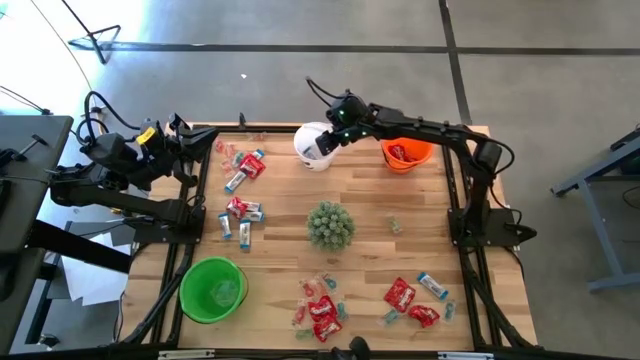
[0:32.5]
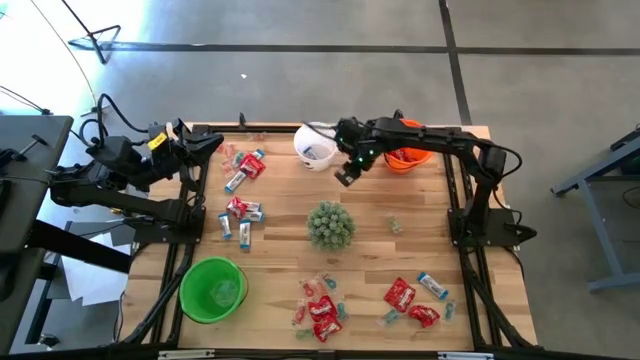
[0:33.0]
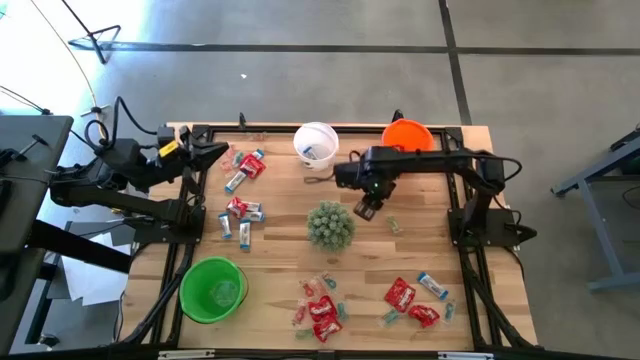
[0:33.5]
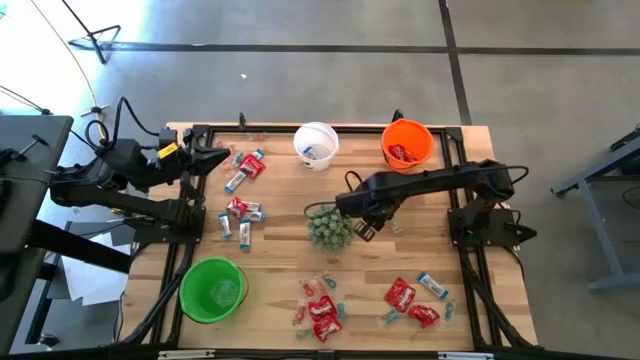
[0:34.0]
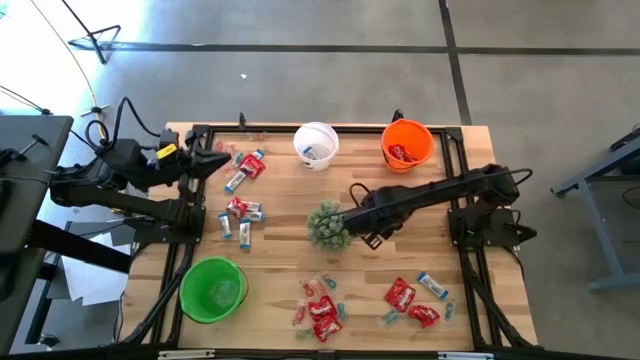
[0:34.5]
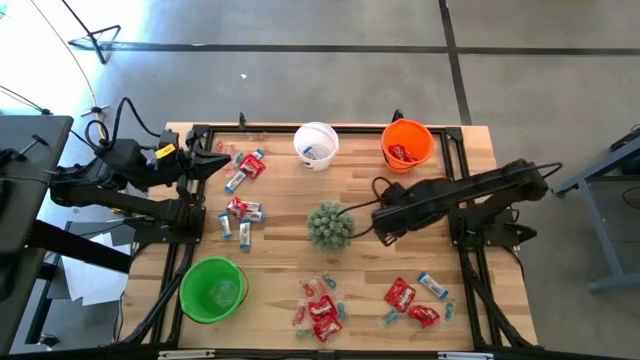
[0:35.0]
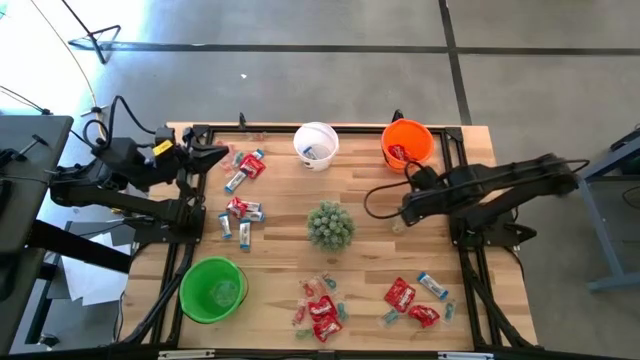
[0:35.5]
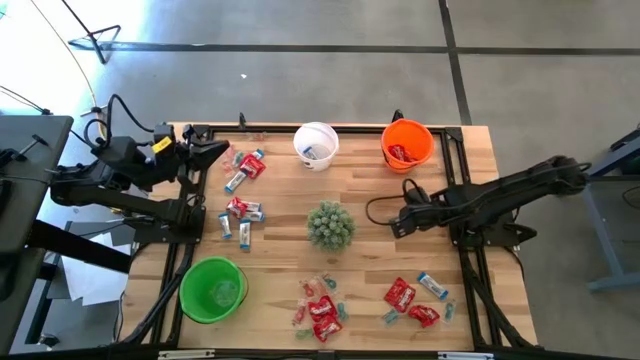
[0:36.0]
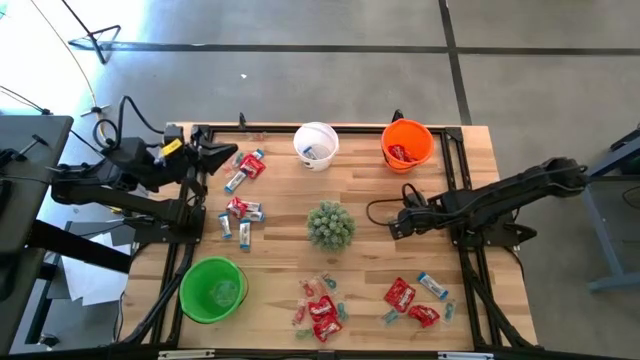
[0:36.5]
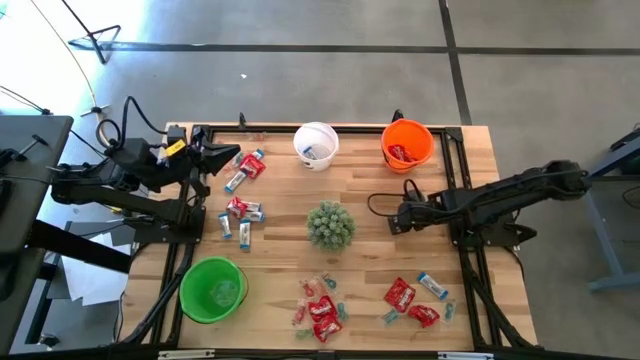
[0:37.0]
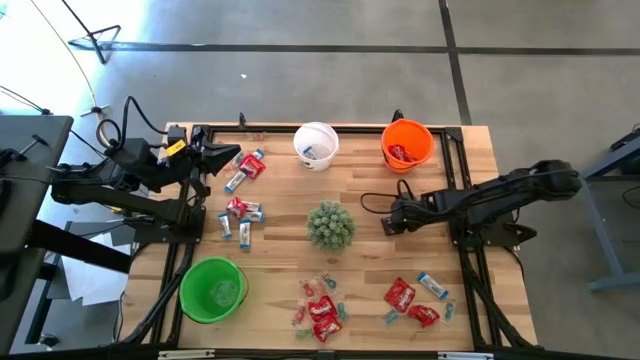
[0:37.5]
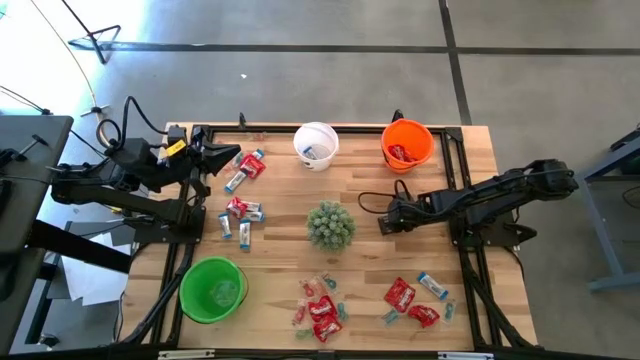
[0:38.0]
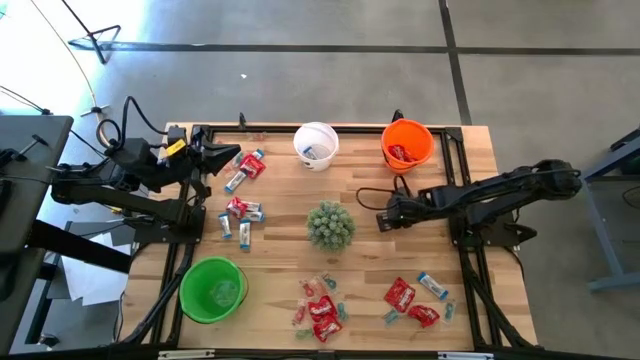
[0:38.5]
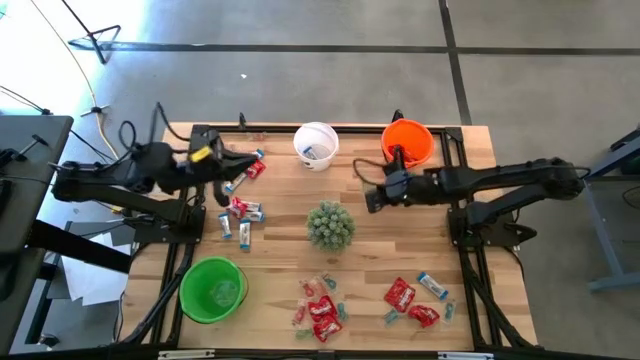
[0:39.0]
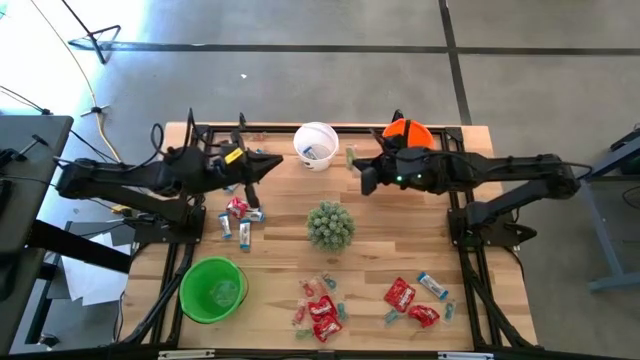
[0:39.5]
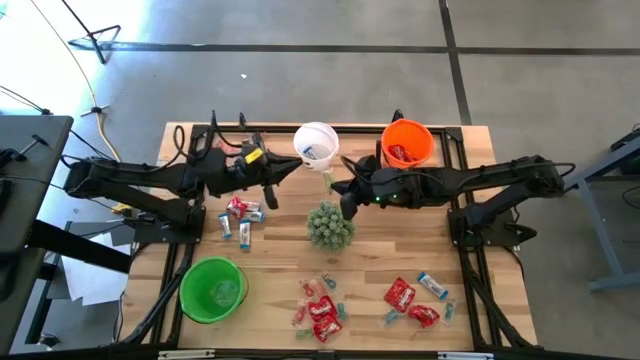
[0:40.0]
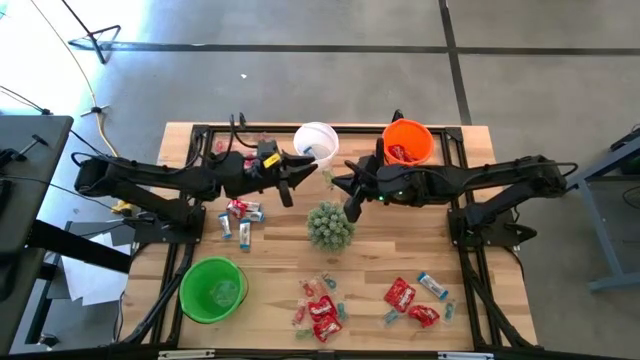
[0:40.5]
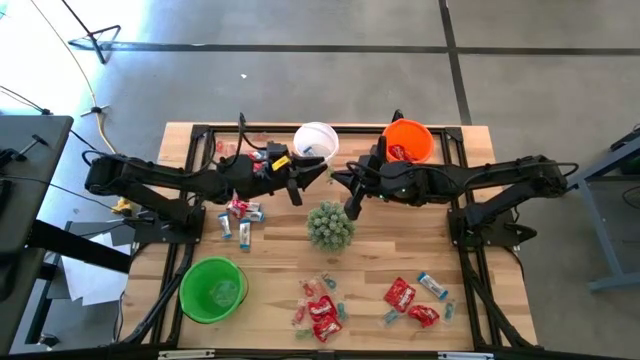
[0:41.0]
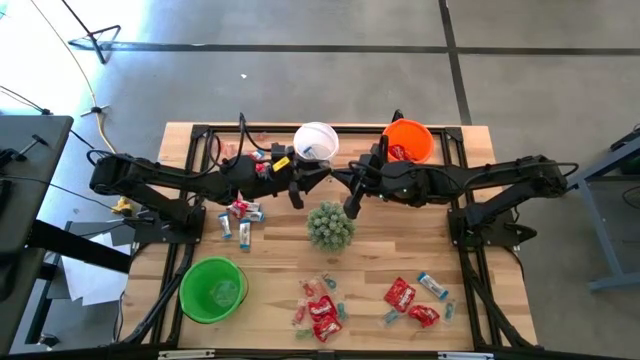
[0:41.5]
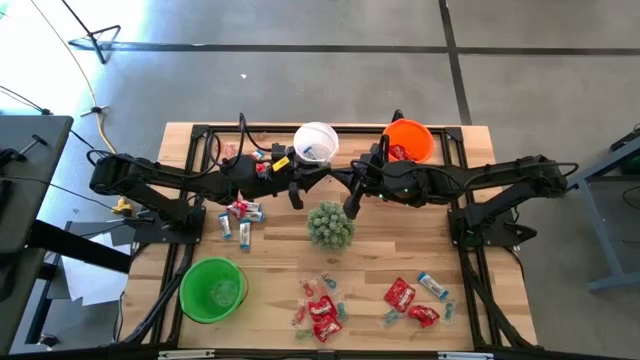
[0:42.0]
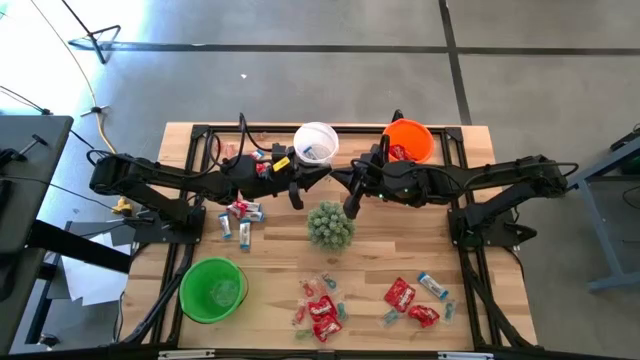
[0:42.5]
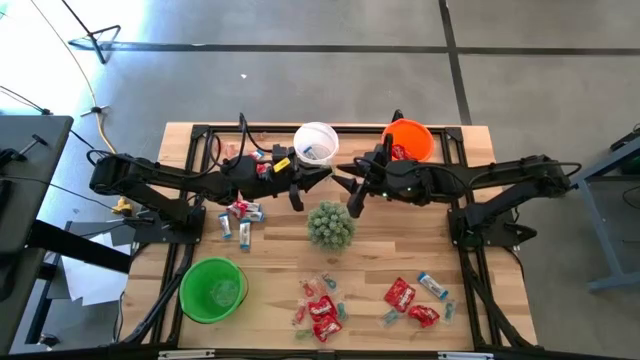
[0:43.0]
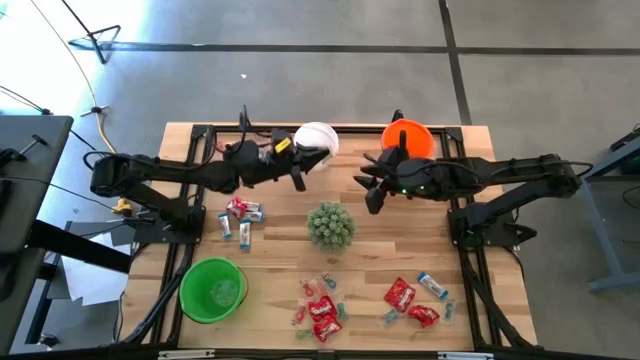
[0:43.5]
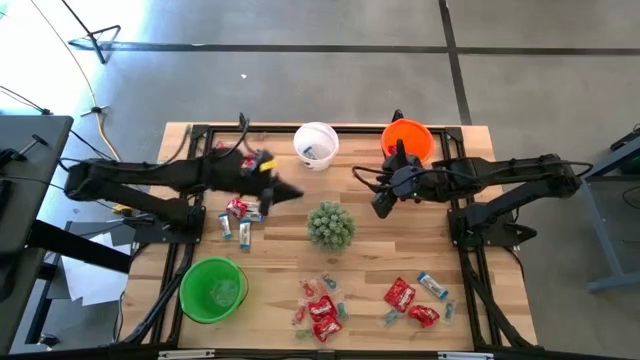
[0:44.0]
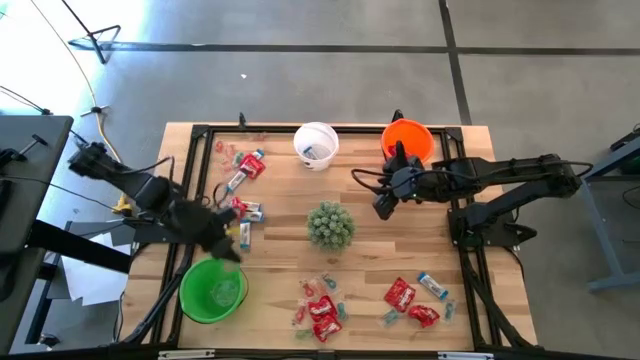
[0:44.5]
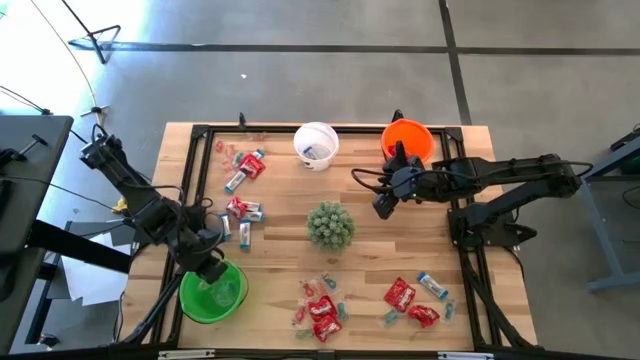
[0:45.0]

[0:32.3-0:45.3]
Task: Sort candy
Put the green gummy into the green bucket

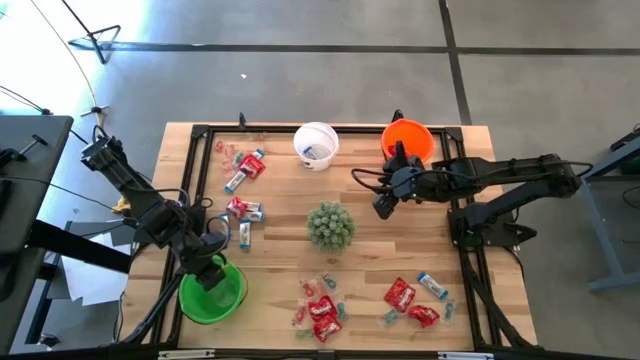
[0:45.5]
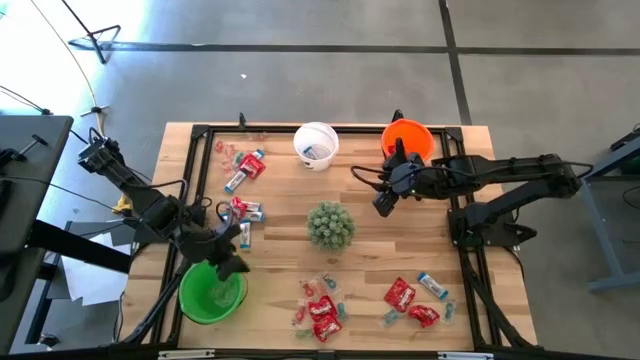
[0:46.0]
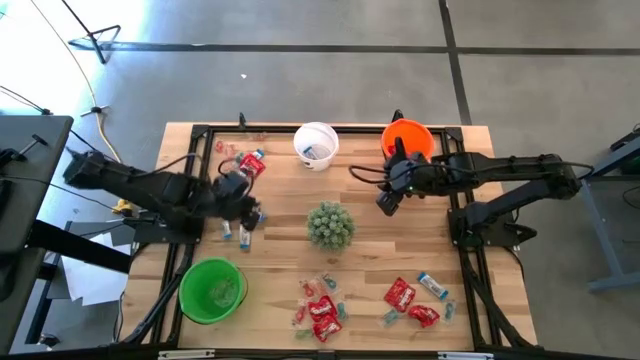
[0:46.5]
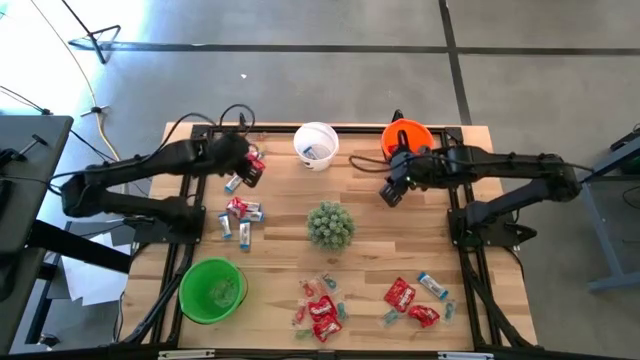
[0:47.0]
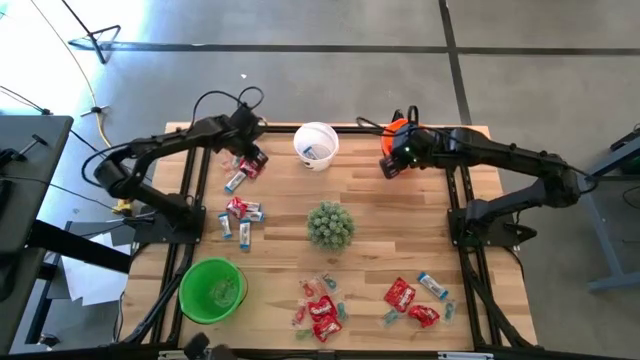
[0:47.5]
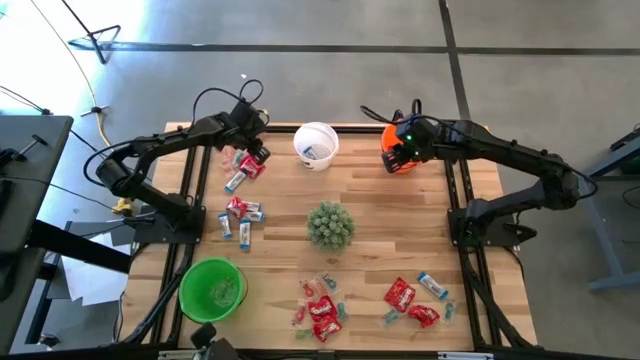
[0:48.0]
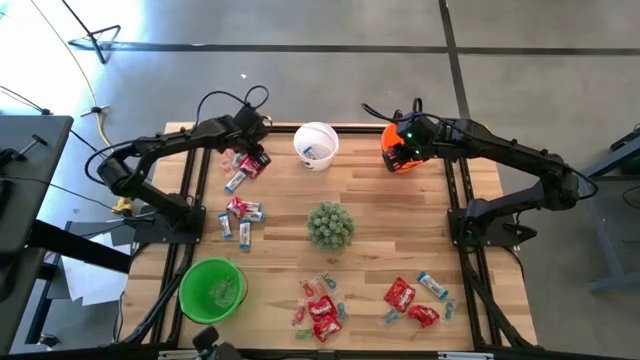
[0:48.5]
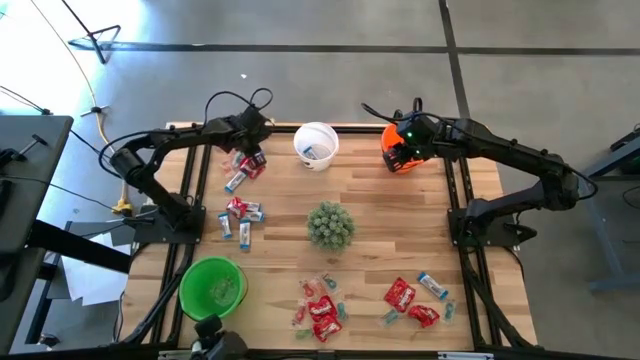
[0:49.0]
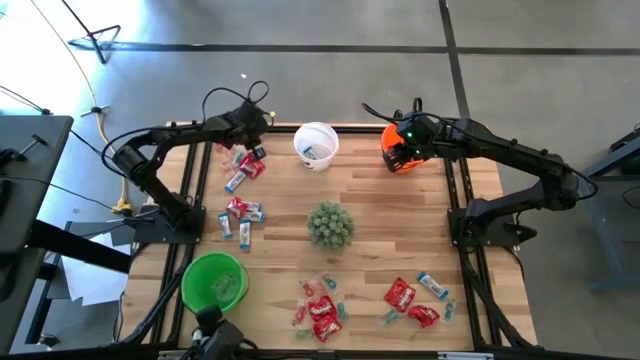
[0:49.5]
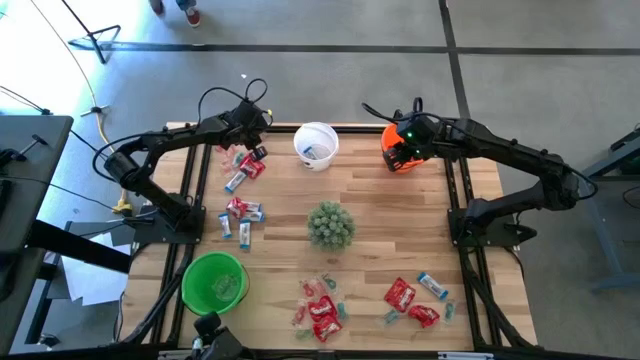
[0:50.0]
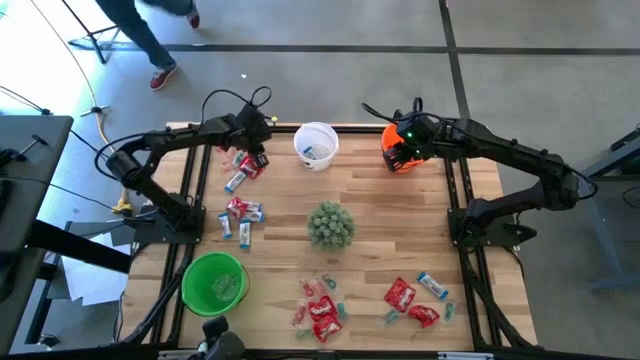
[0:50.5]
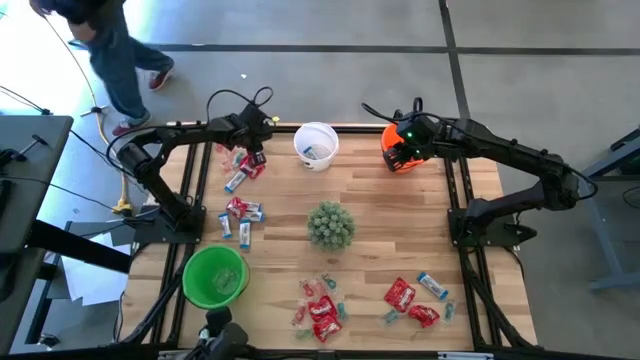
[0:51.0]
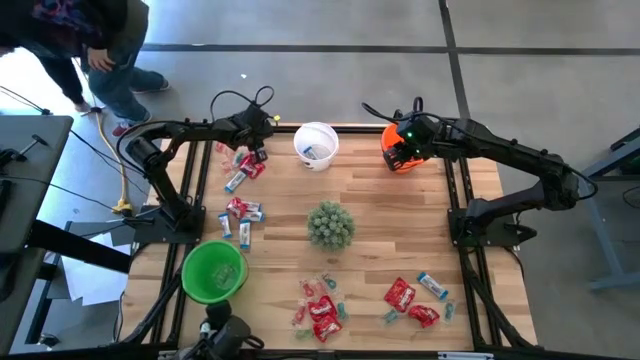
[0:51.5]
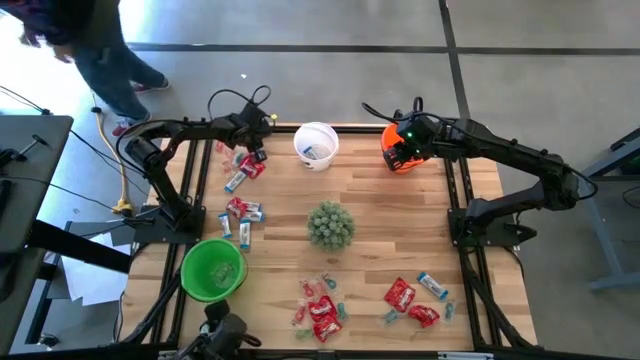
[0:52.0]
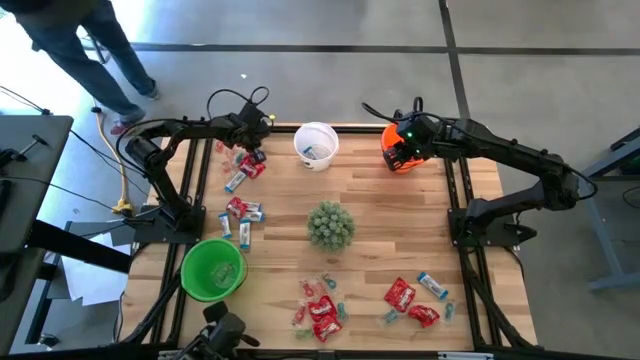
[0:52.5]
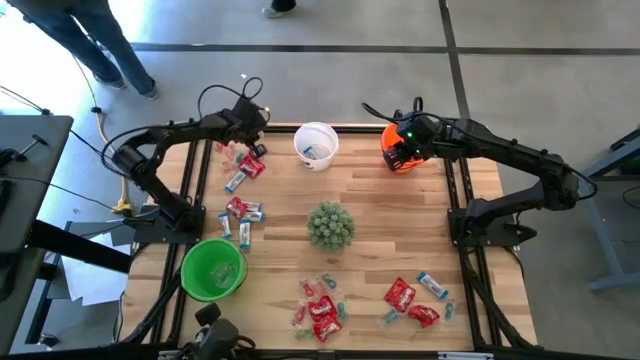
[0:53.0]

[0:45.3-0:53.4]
Put the orange candy into the green bucket
